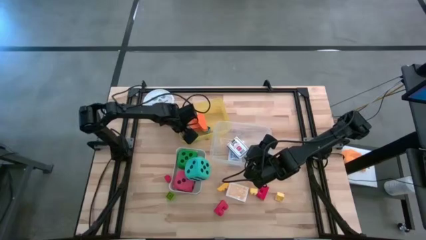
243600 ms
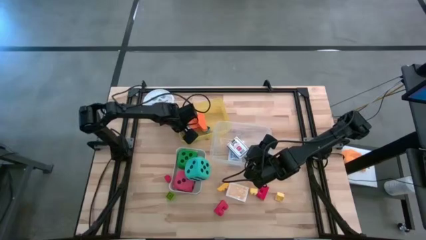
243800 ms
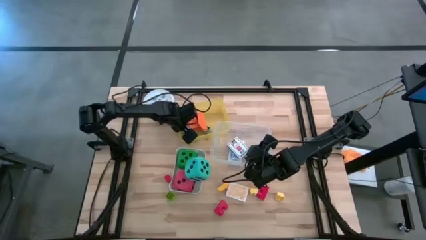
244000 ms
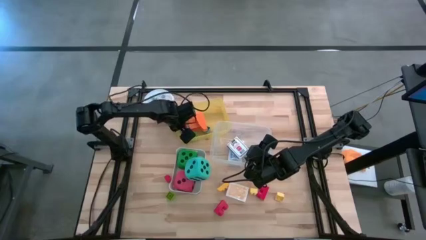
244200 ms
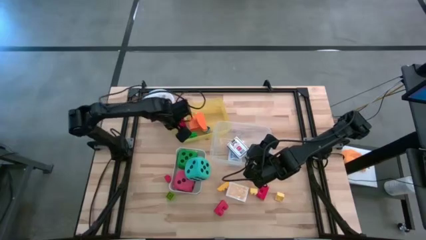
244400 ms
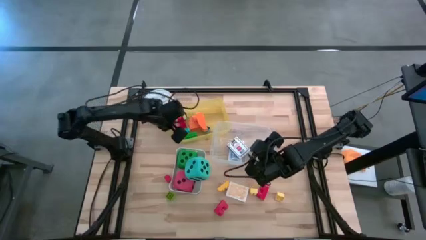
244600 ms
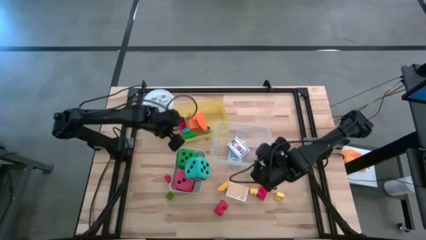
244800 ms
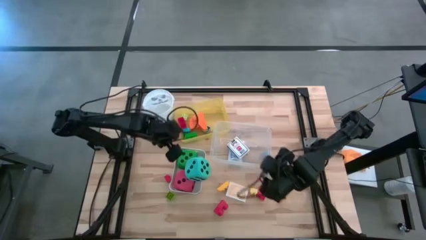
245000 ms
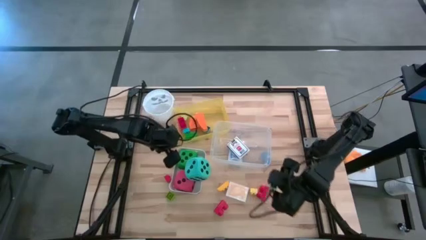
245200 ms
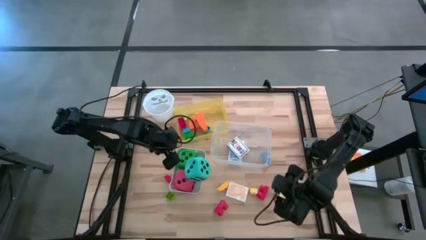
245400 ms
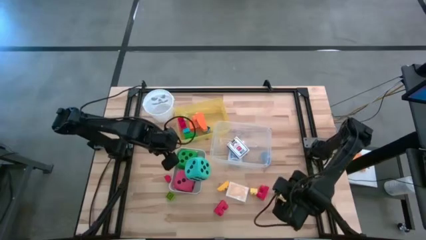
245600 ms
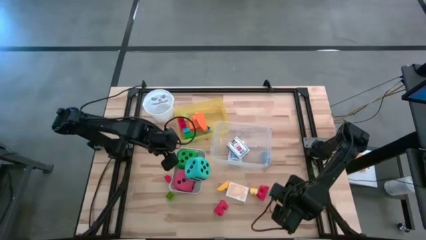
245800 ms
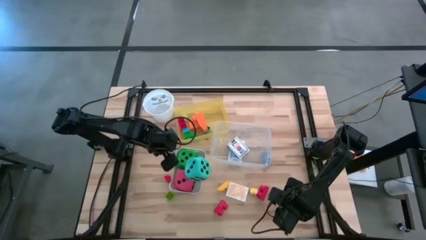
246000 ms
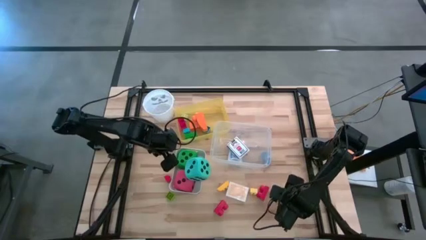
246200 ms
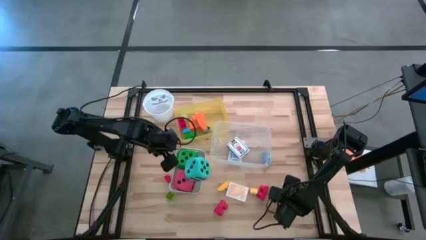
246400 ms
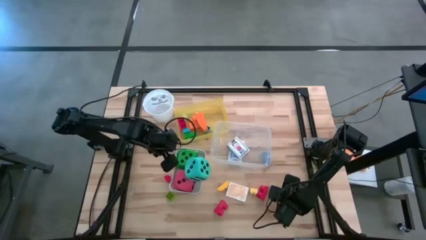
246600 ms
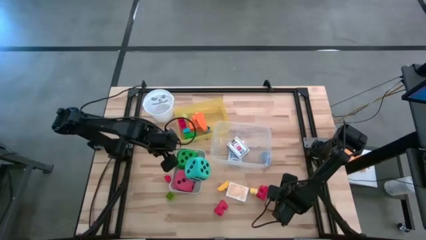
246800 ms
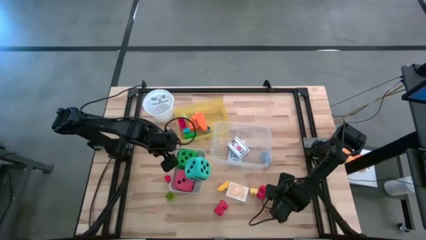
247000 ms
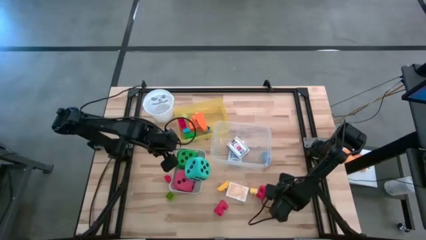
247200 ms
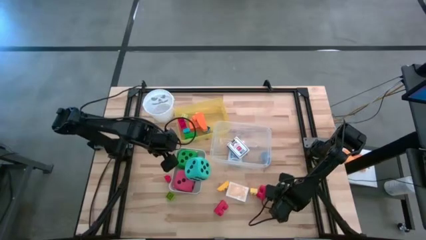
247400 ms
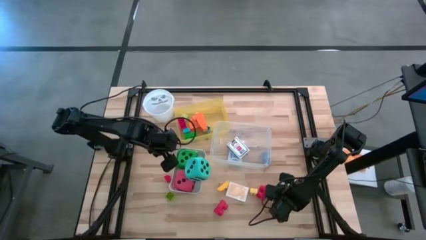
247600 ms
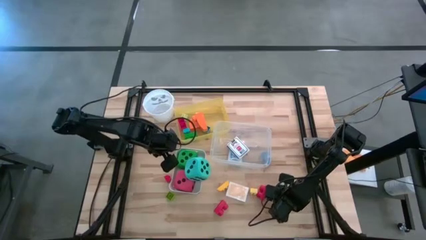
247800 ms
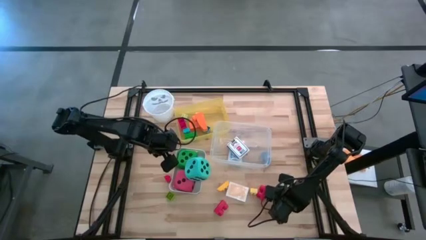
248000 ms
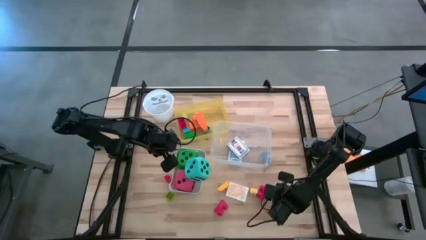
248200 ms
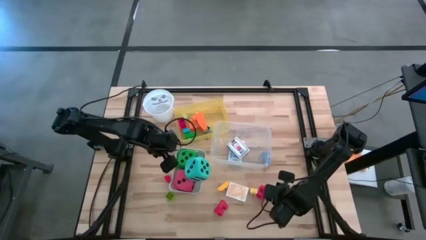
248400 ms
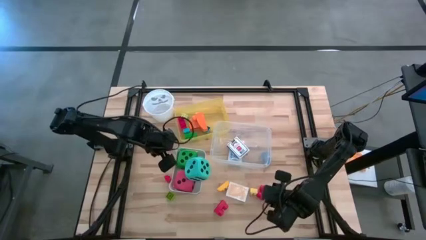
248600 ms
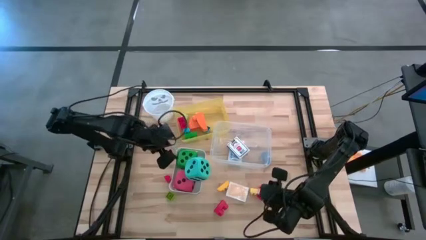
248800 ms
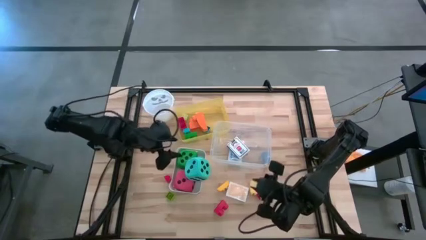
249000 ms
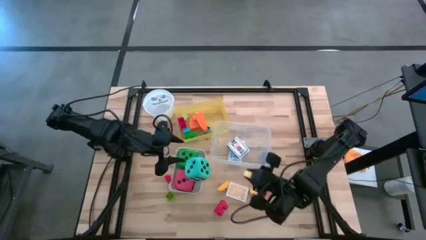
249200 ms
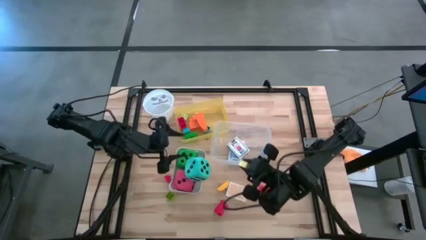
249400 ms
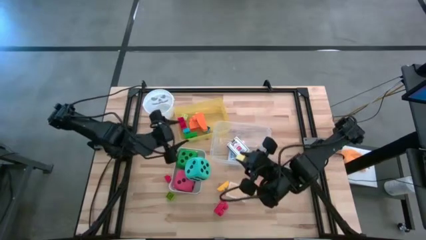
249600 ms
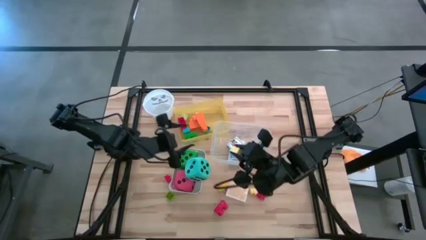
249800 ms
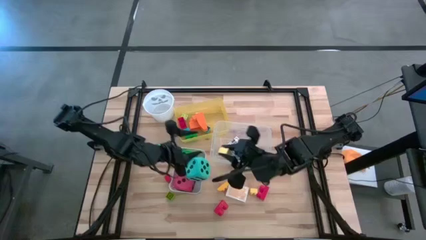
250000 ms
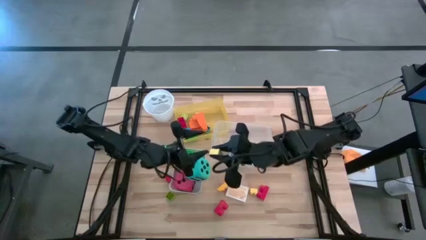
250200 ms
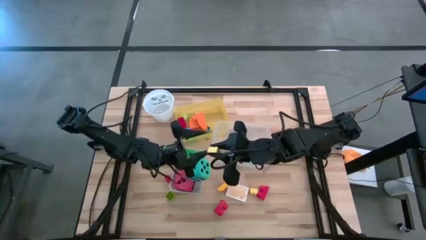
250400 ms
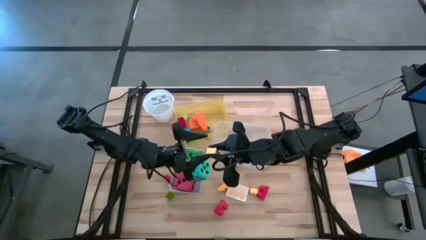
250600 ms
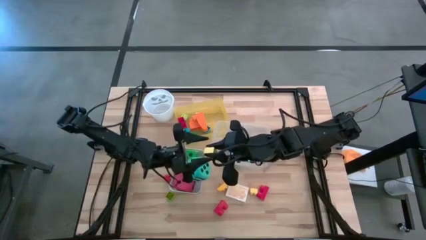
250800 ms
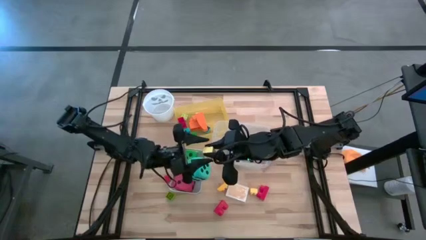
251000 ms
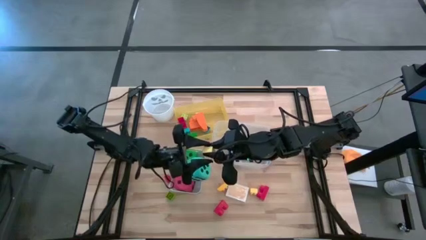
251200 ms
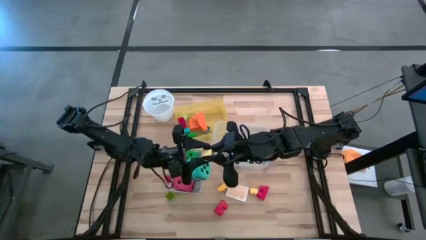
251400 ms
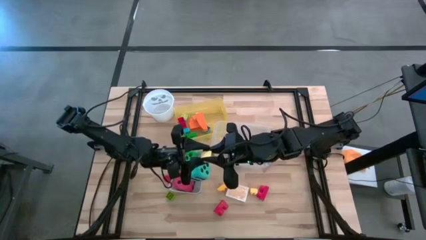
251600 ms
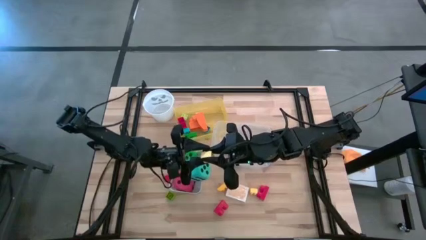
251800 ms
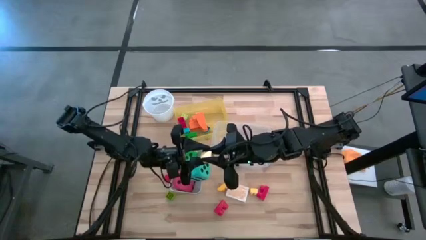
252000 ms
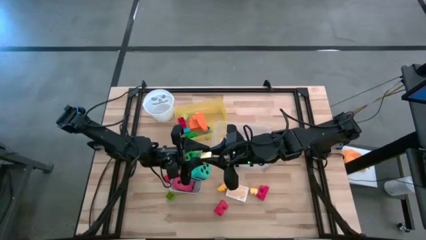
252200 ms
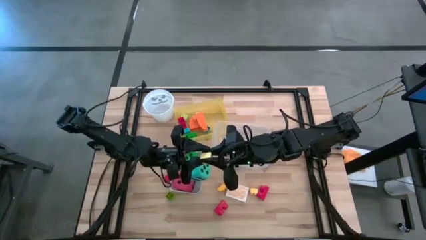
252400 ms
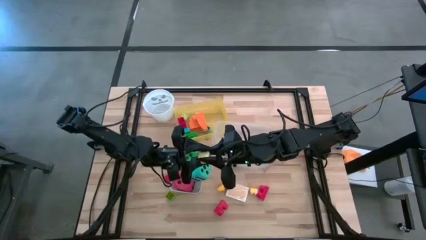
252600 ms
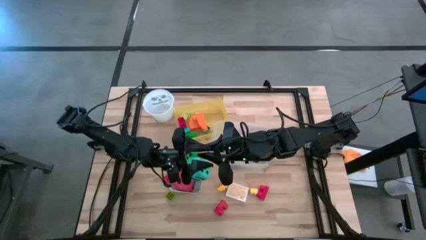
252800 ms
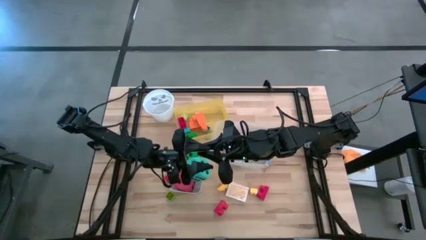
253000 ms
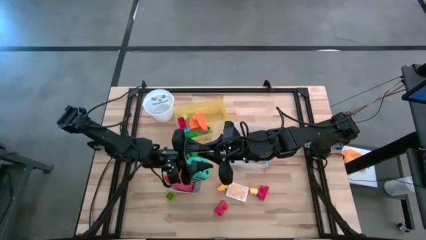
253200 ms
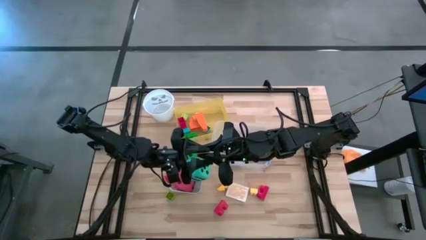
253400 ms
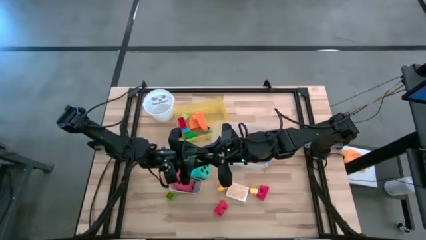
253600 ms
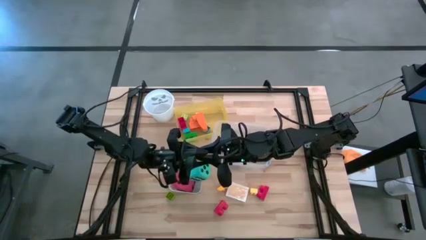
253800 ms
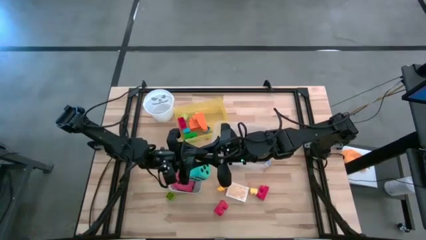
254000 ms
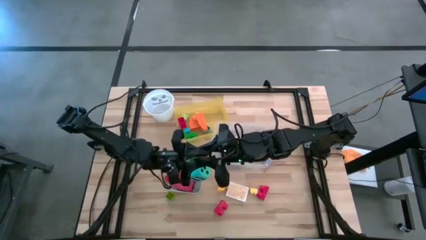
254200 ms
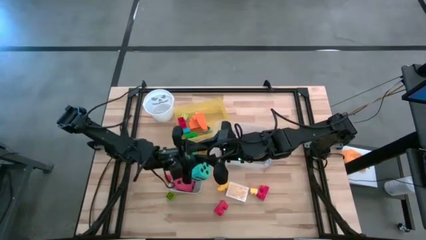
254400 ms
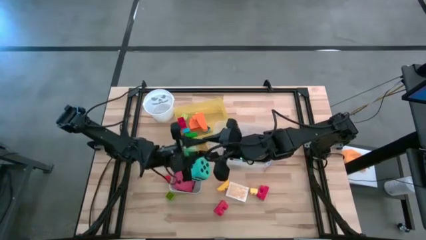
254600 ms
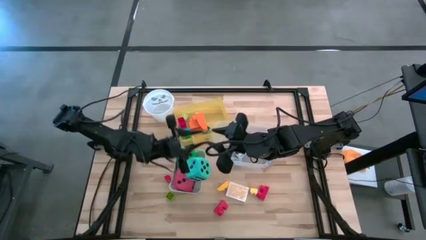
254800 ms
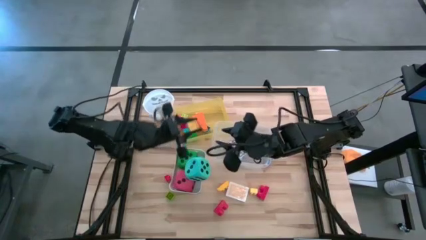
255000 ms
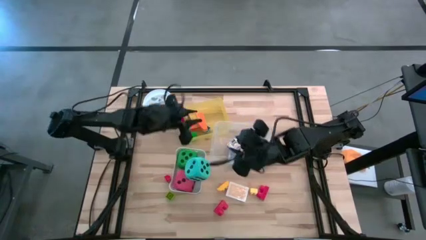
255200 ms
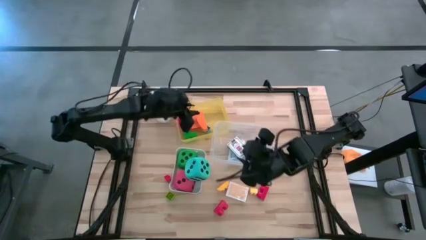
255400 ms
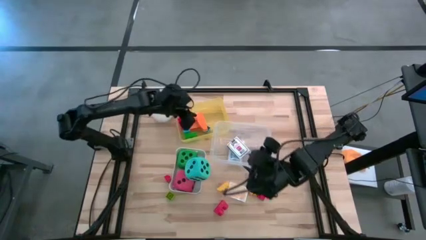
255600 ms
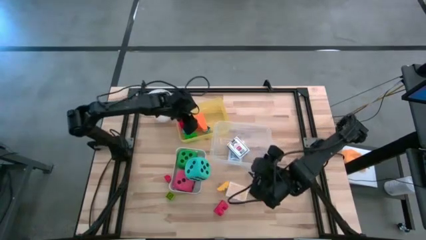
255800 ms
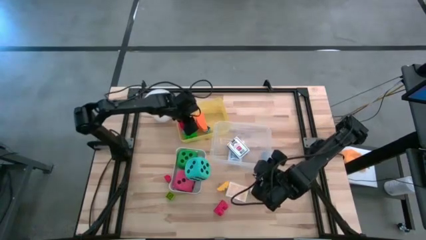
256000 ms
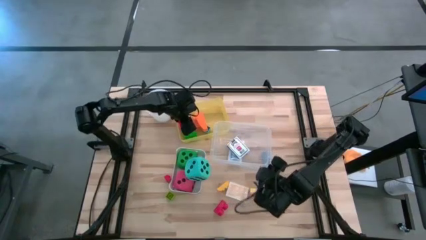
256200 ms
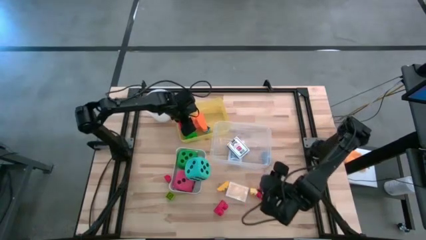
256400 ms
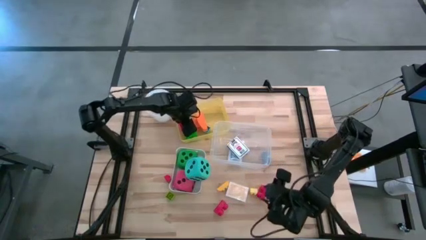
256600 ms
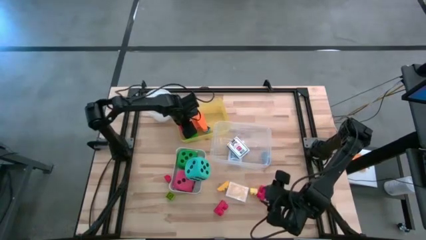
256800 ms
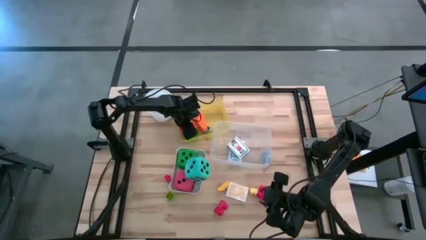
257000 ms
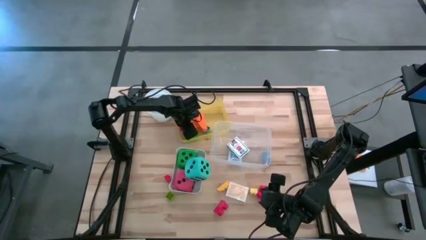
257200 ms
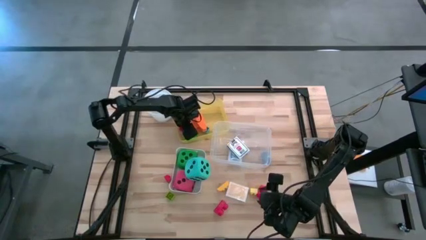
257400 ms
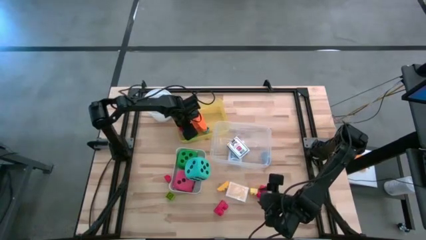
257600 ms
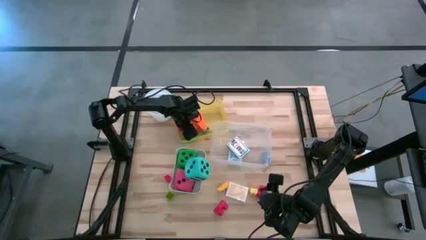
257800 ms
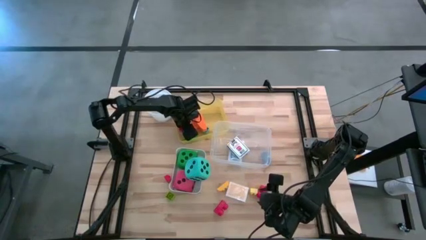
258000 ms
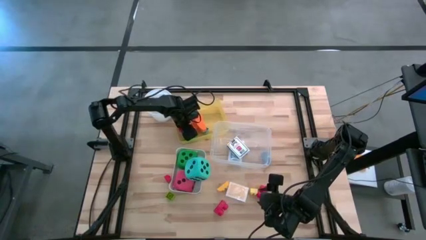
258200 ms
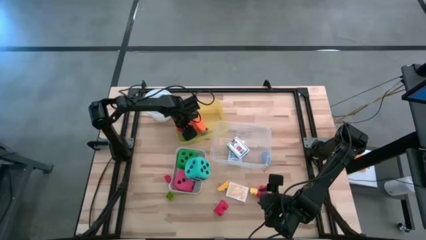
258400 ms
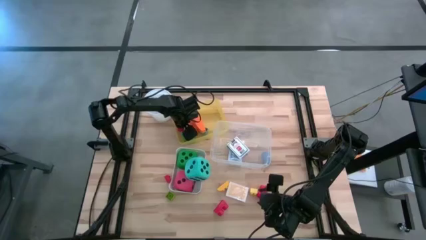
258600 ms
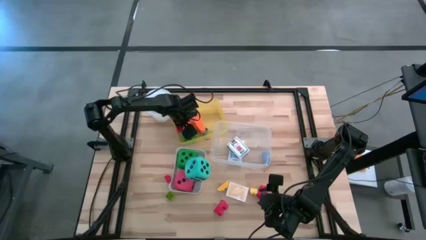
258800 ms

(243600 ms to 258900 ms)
Task: Pick & Place Toys
Put the yellow game piece into the yellow bin
